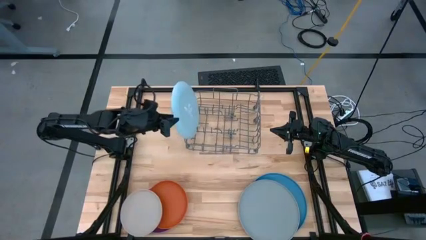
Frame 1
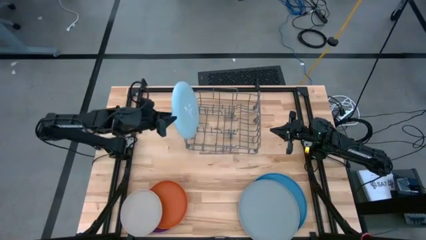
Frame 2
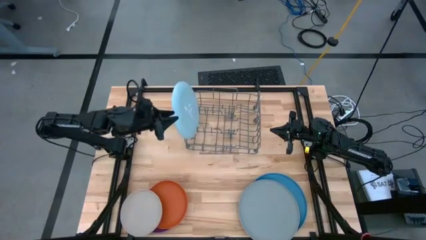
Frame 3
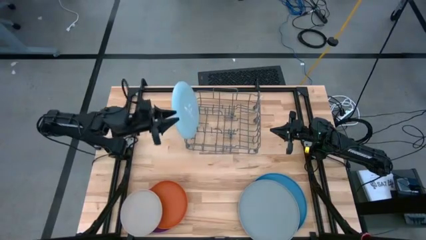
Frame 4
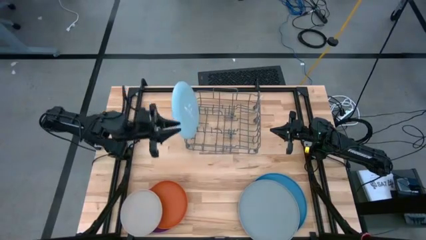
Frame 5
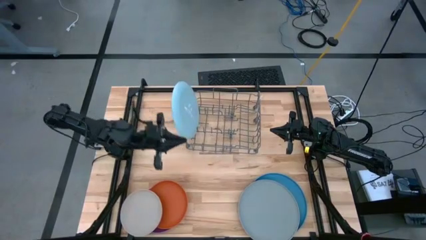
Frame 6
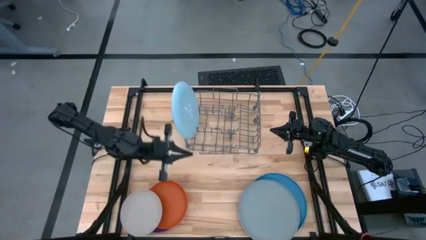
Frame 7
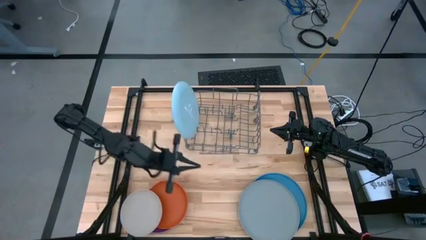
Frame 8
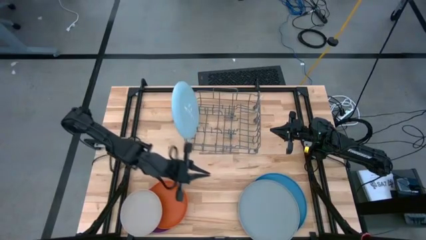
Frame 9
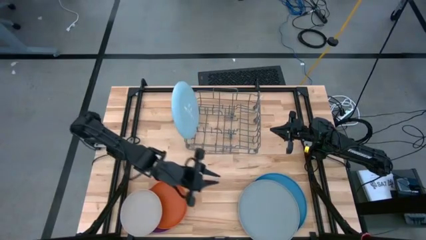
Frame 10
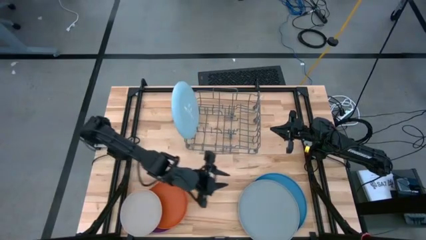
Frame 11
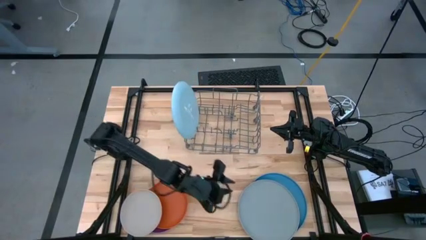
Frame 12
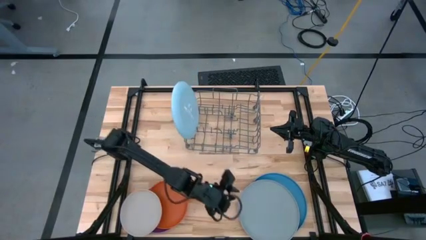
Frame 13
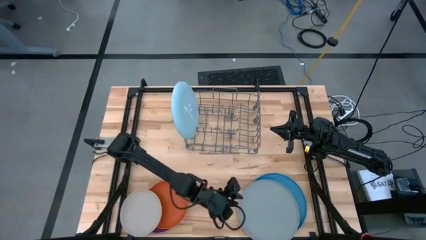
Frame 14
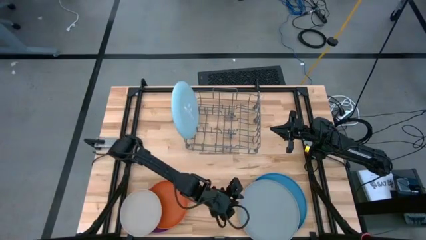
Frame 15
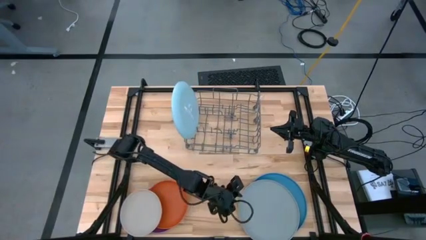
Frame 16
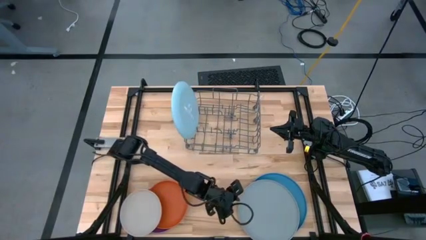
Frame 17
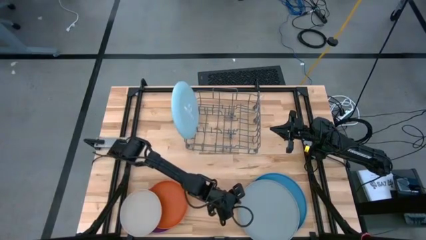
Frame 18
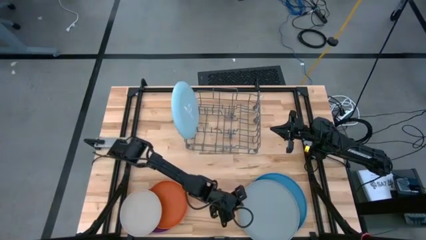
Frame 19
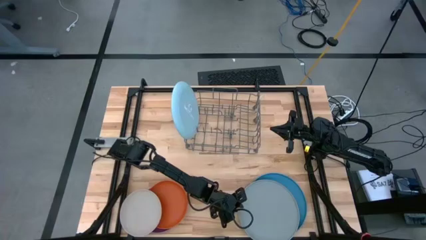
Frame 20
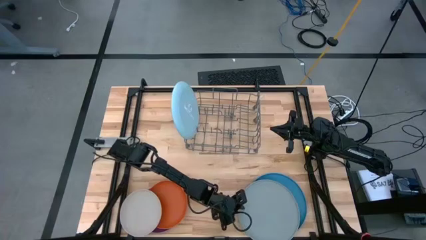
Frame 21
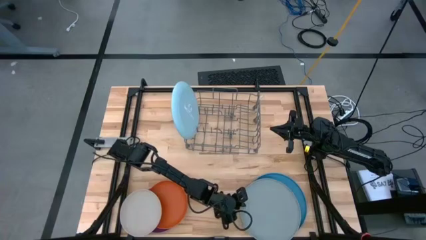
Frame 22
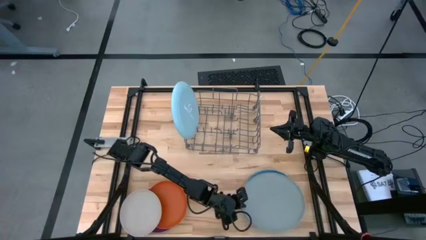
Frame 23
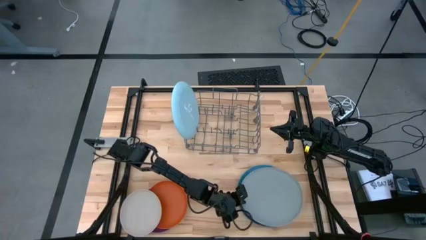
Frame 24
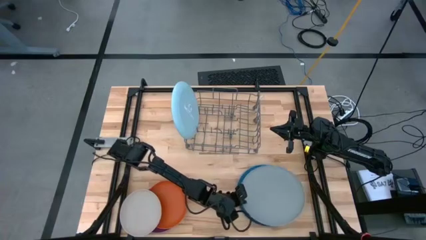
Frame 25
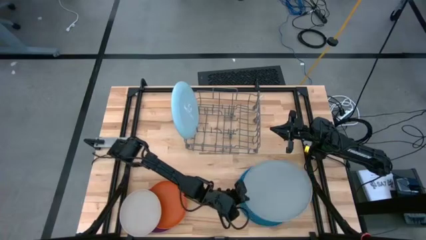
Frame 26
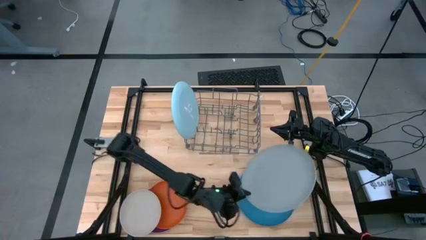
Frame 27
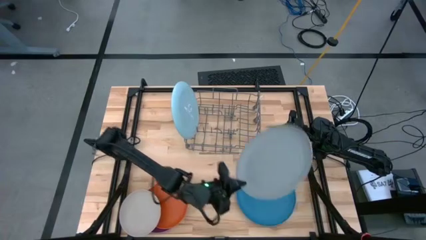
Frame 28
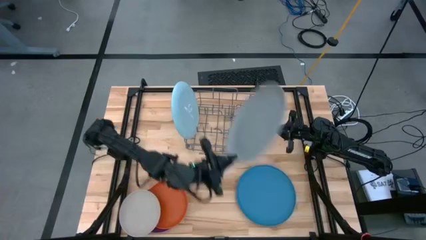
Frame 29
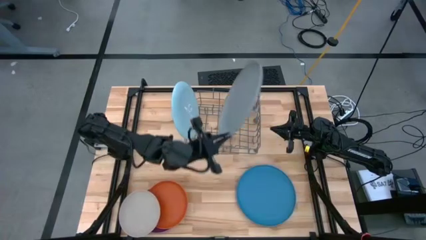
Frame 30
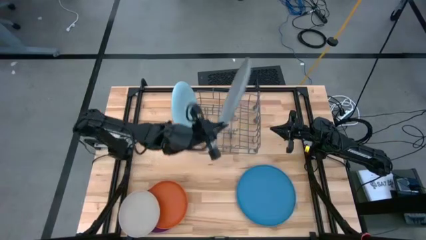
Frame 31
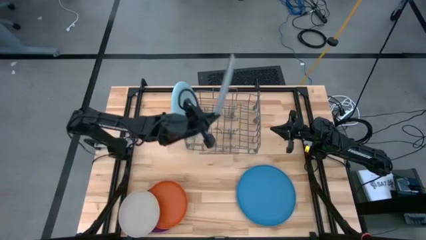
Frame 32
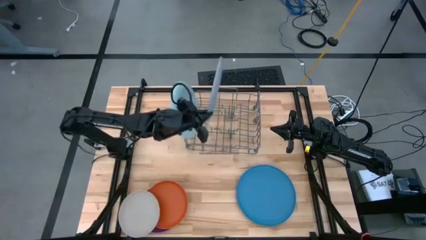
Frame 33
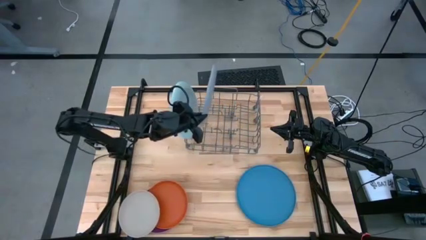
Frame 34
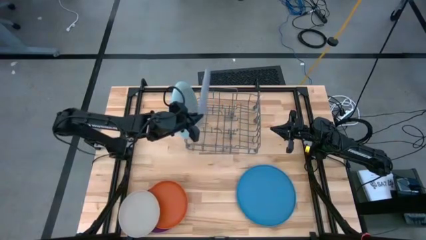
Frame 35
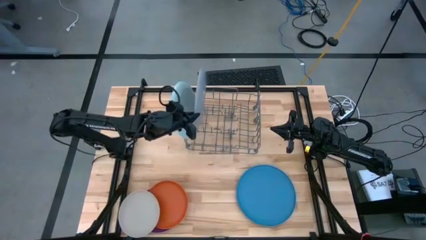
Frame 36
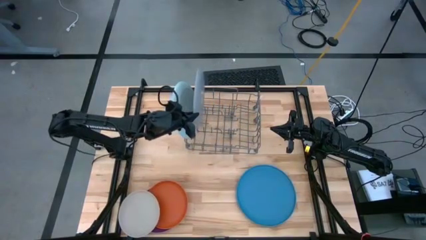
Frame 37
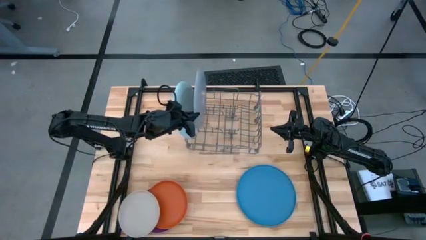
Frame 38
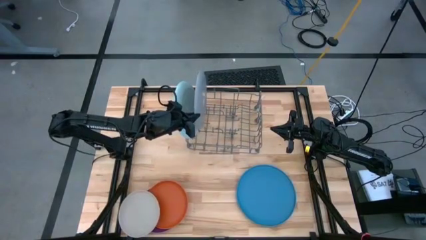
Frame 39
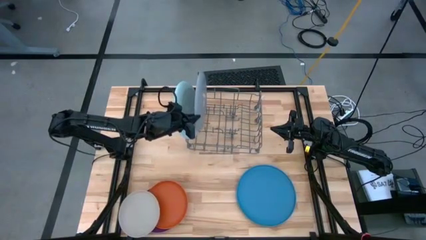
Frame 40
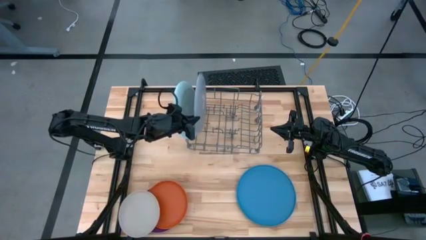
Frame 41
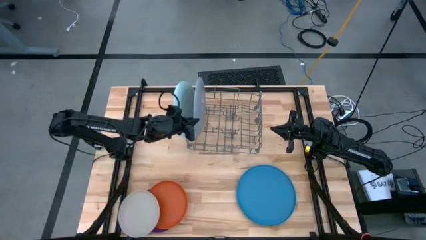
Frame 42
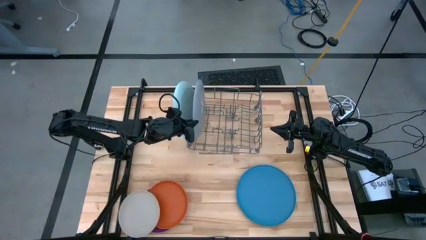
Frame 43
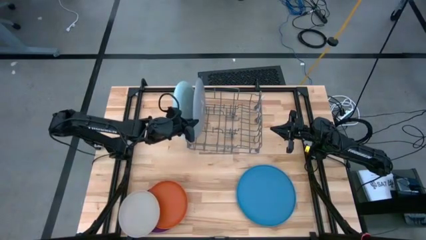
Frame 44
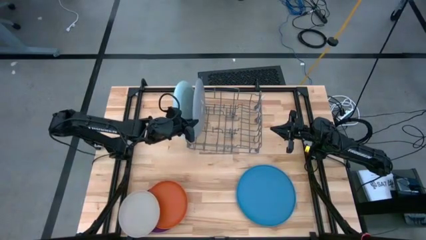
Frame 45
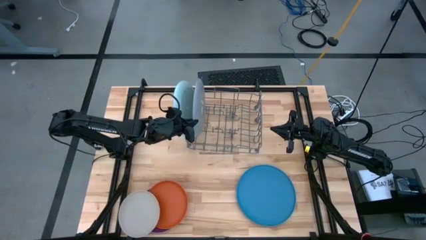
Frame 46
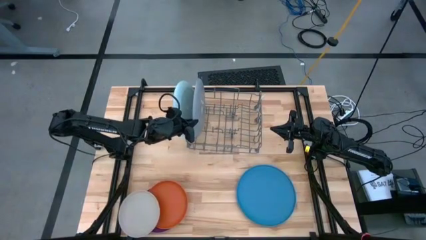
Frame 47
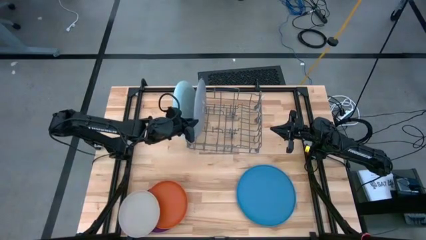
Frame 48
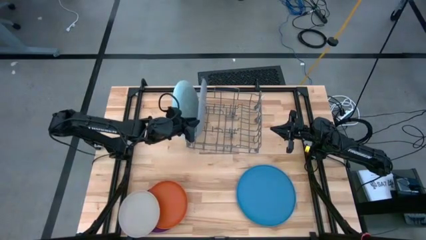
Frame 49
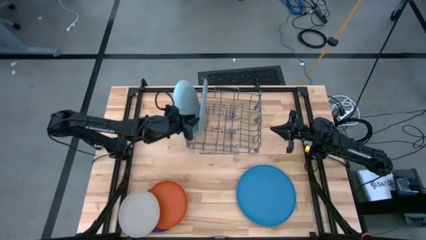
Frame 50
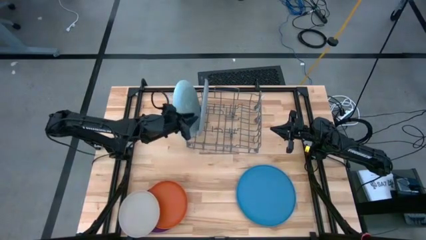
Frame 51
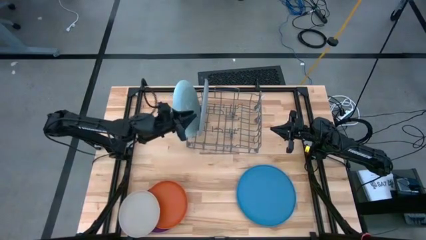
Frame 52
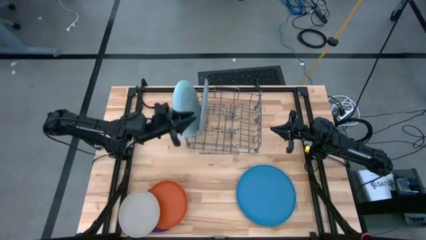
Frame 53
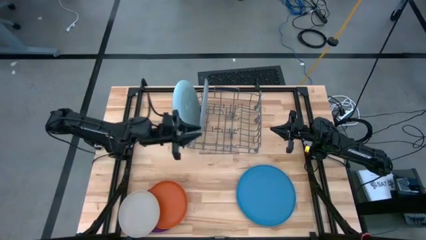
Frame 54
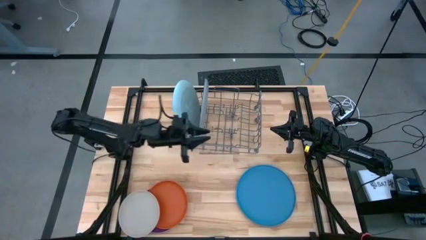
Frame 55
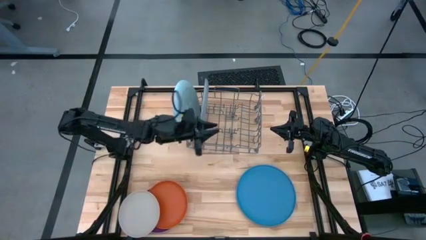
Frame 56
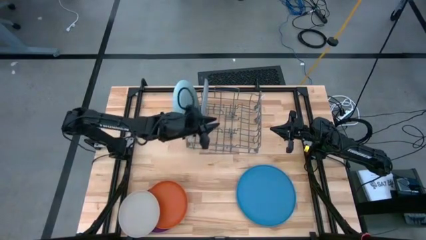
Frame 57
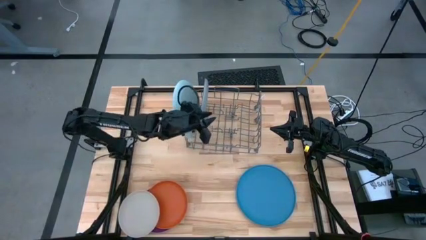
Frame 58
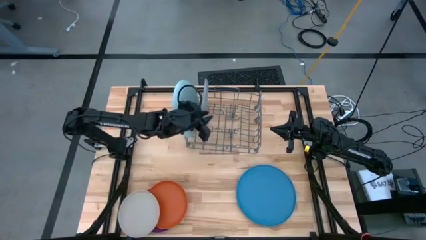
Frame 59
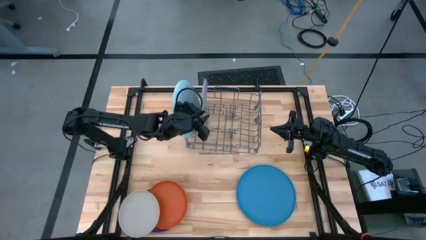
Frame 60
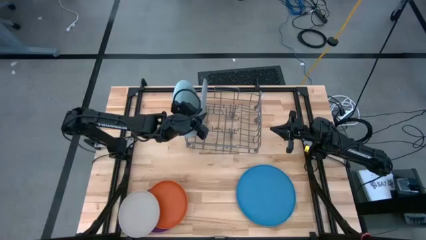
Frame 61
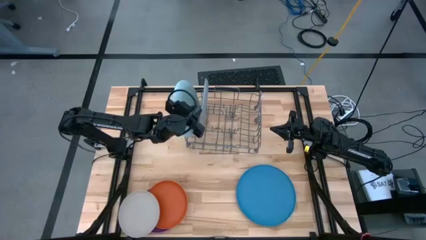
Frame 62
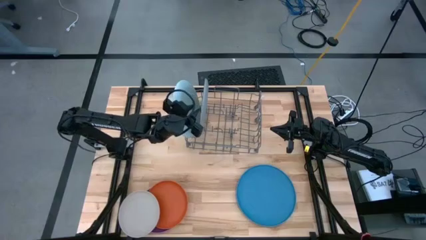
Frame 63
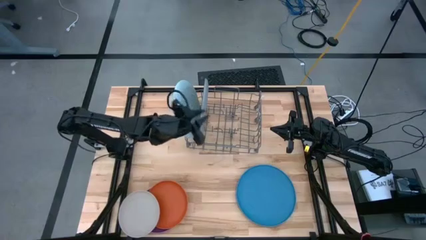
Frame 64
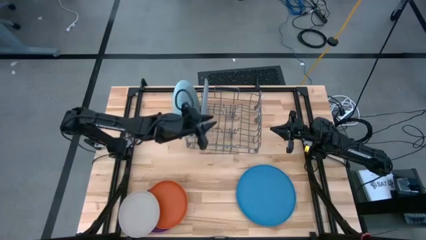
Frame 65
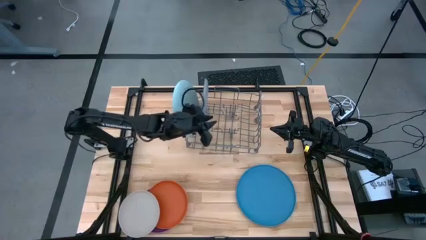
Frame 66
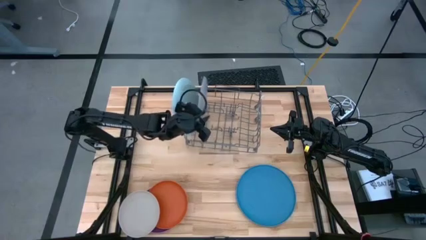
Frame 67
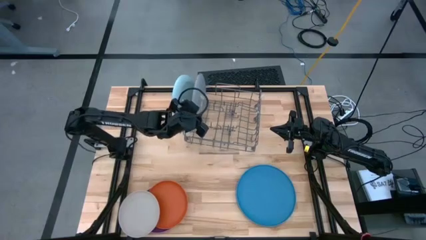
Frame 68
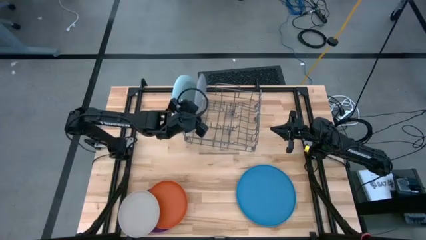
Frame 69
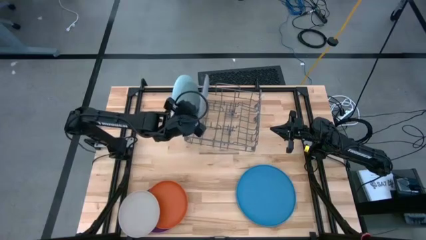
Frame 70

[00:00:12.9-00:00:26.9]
Task: Sort dishes
Put the gray plate into the dish rack
